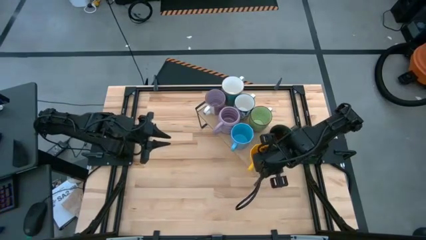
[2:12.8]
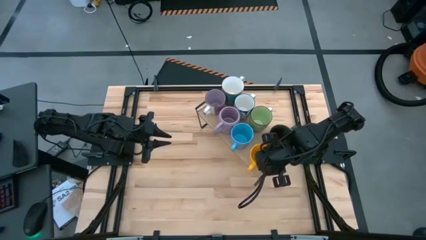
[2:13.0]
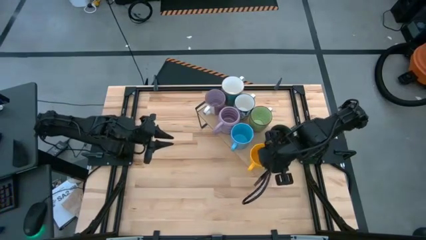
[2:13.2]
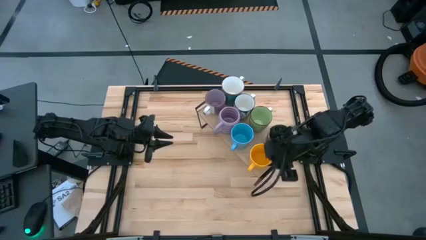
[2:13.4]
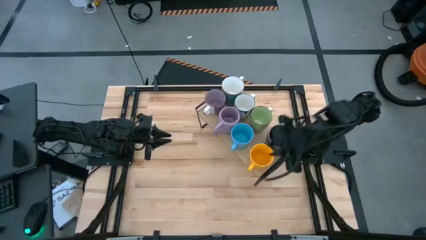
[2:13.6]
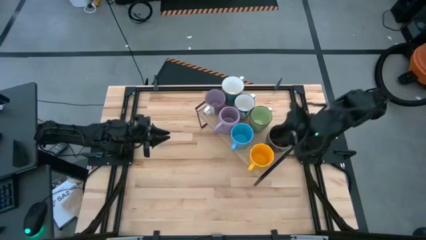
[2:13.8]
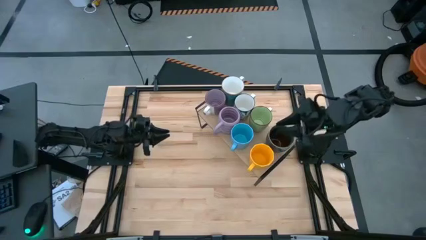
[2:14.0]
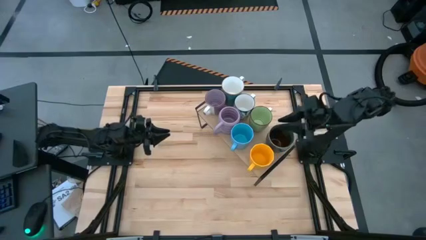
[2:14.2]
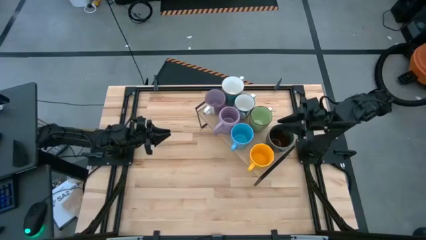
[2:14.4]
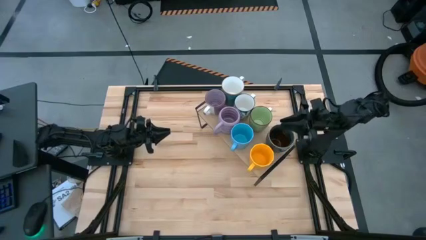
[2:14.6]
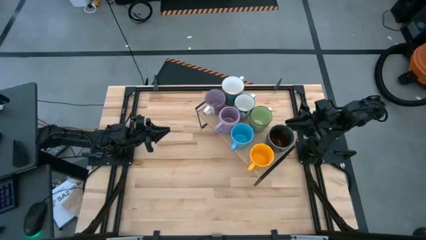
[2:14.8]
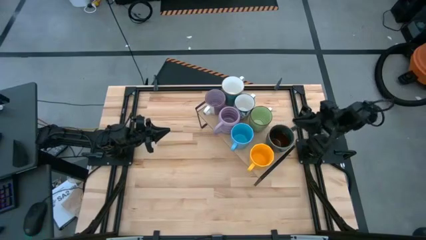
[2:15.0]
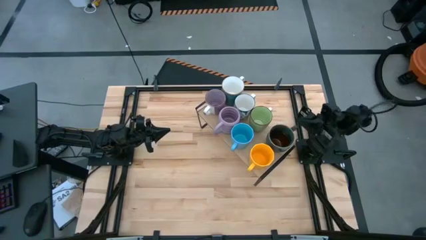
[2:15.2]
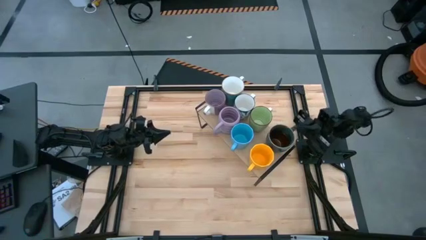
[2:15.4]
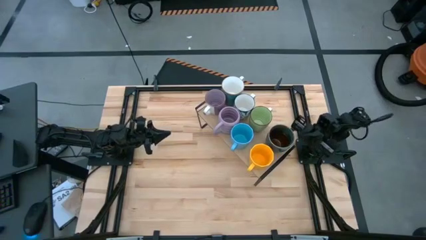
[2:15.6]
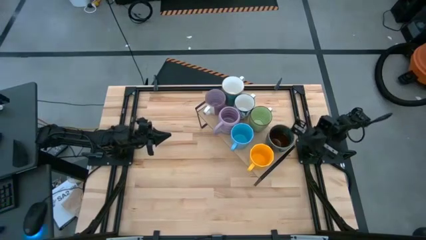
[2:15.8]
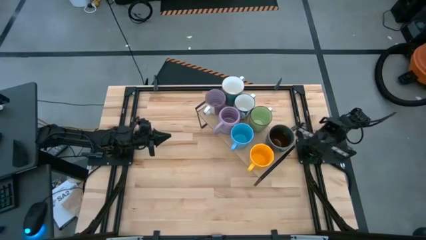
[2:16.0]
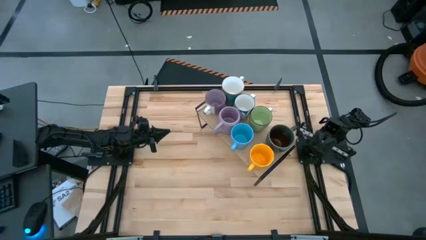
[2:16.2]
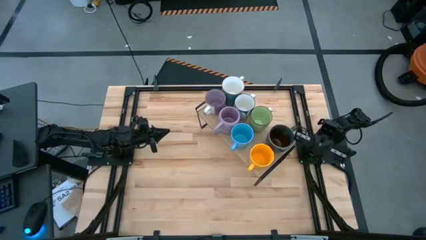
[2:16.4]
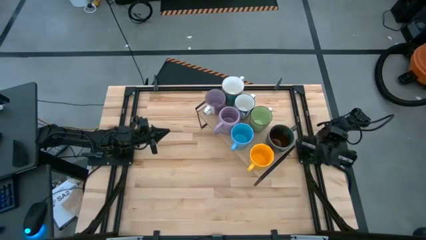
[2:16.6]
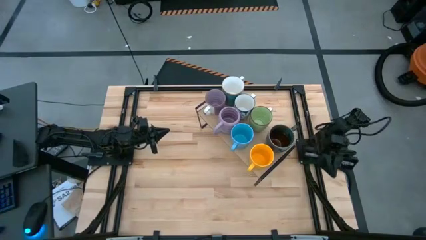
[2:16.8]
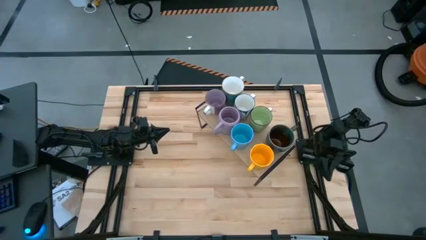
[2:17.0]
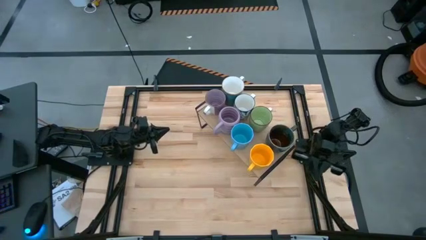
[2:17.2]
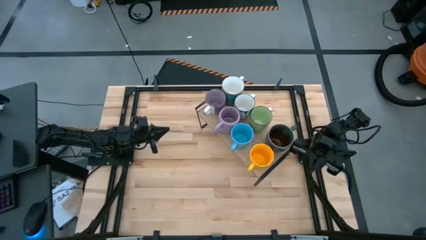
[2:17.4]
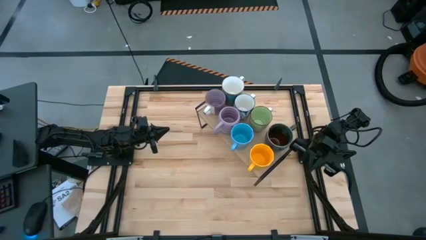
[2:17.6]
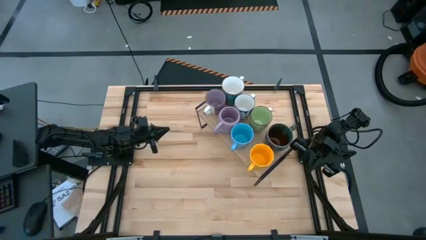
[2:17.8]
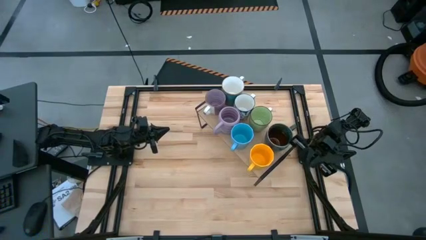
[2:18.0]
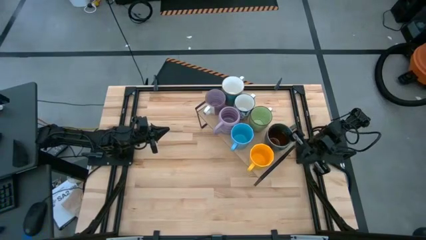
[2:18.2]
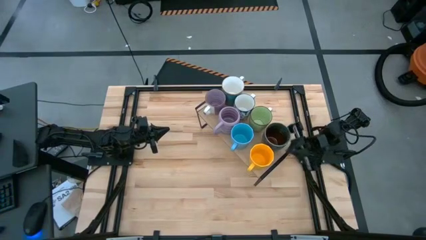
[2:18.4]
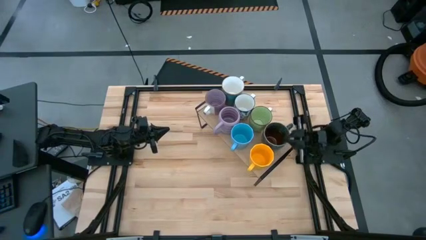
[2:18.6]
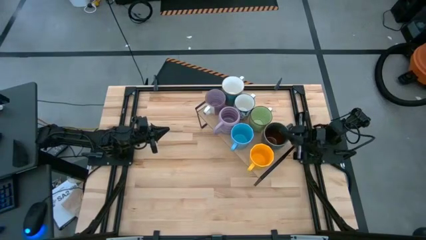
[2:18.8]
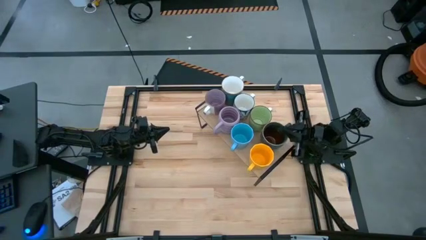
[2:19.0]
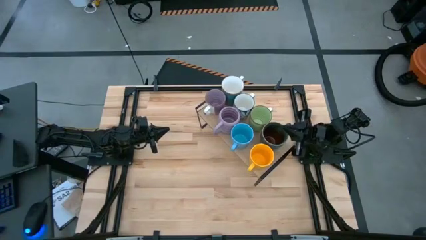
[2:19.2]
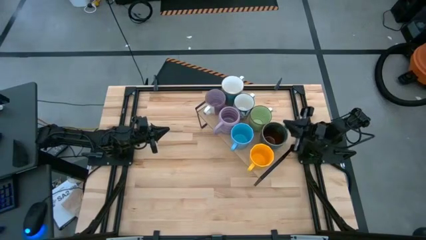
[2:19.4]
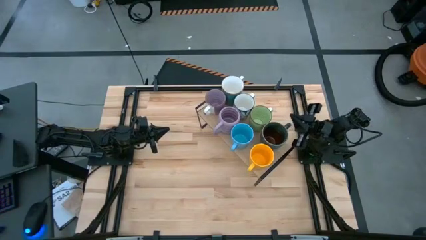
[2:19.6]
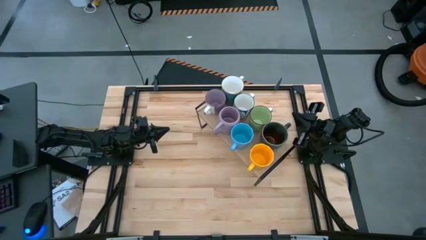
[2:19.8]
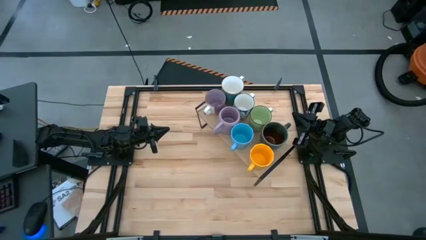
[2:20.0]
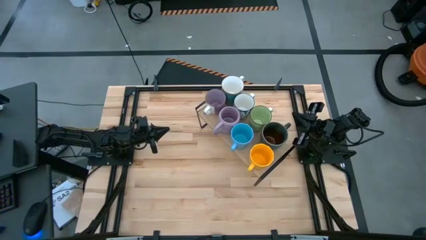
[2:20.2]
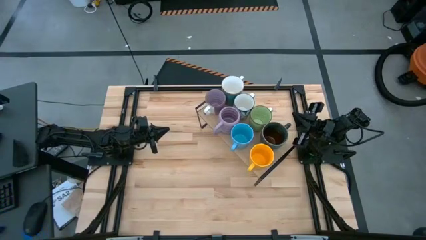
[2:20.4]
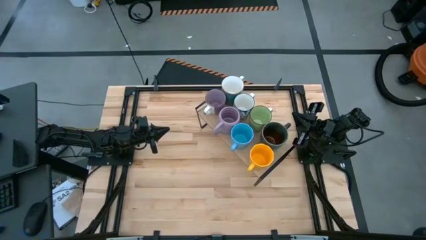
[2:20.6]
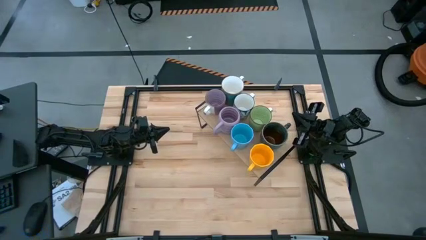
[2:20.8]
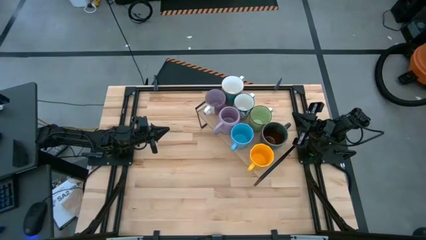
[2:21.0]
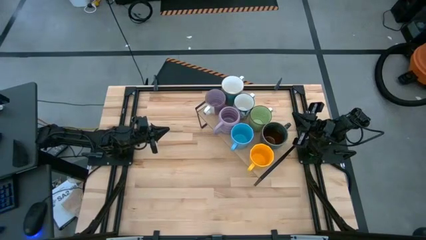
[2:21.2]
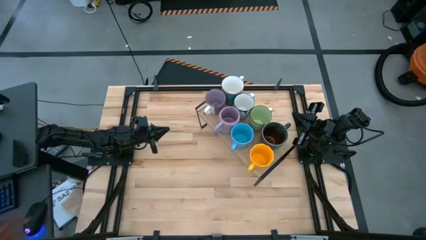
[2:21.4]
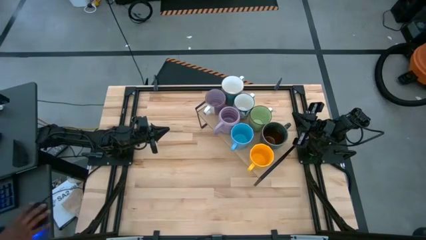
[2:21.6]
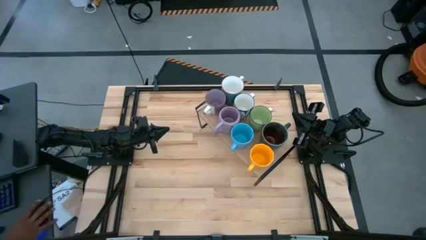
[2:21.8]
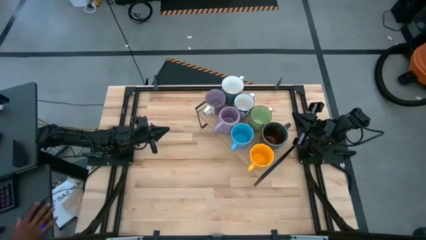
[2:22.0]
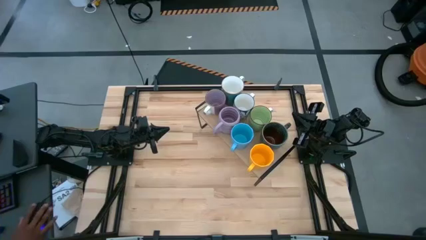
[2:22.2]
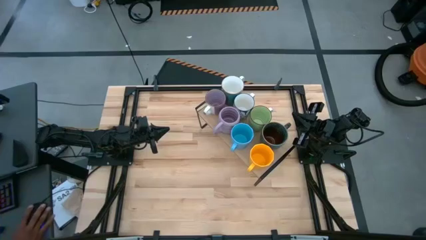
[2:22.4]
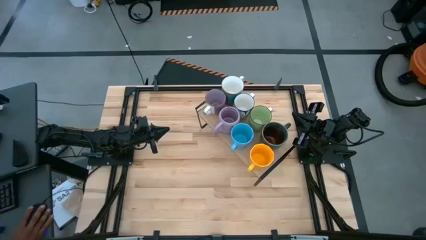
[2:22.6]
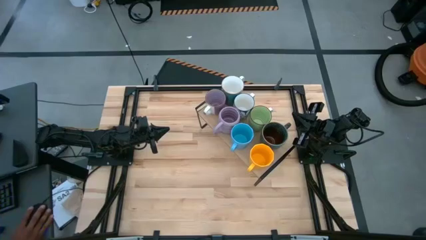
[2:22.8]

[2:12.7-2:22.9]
Task: Place coffee mugs
Return to Home Position

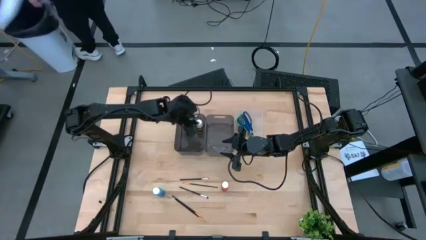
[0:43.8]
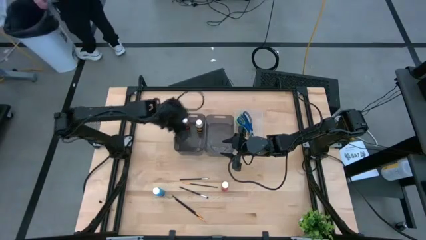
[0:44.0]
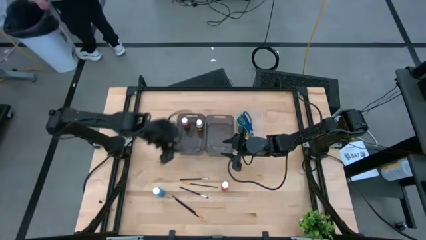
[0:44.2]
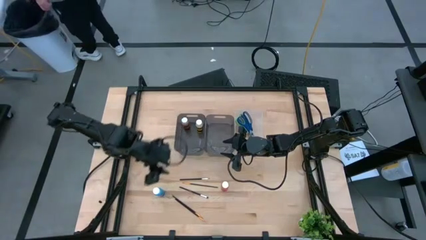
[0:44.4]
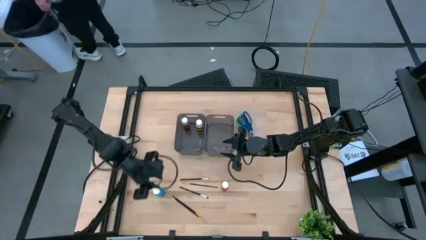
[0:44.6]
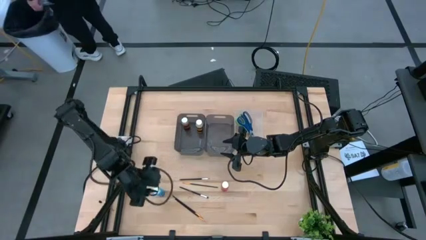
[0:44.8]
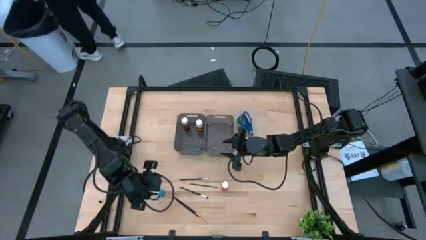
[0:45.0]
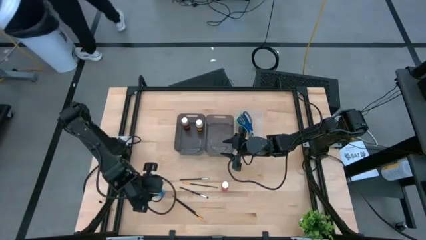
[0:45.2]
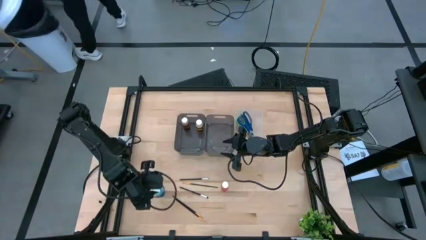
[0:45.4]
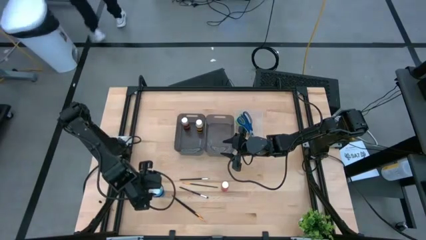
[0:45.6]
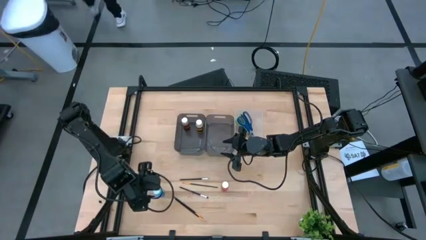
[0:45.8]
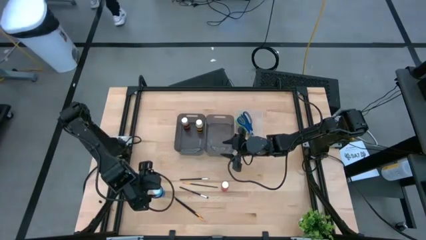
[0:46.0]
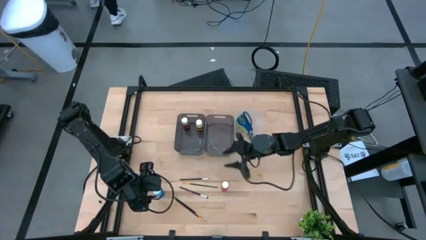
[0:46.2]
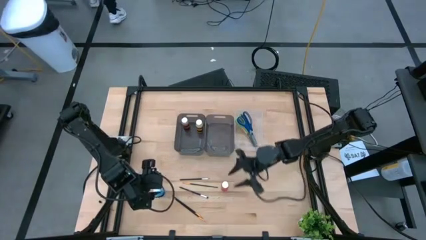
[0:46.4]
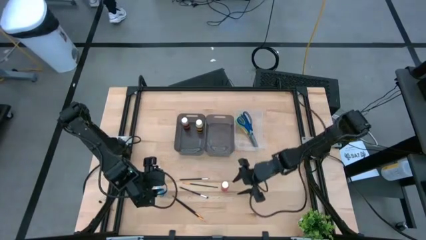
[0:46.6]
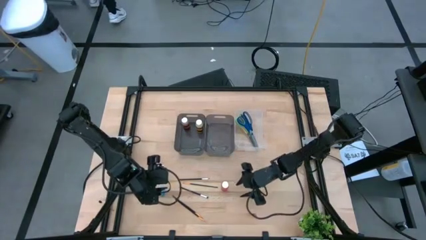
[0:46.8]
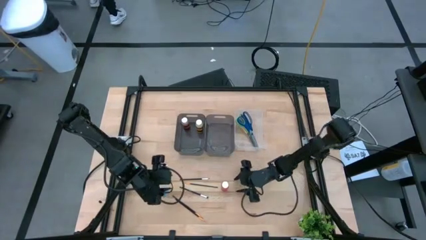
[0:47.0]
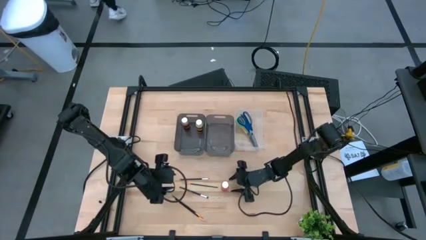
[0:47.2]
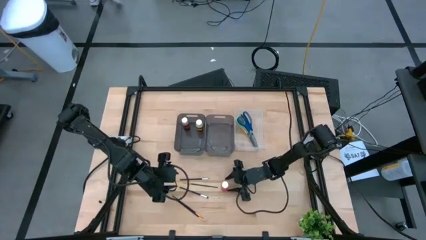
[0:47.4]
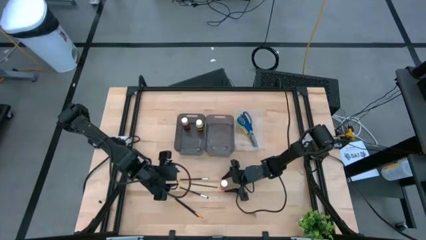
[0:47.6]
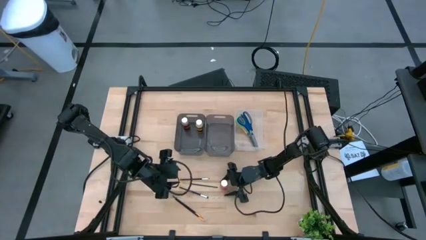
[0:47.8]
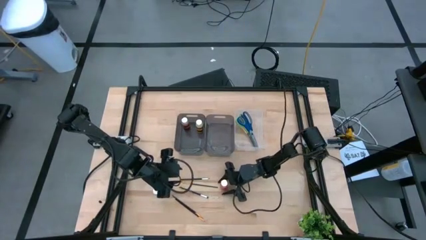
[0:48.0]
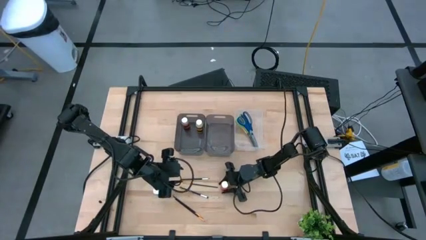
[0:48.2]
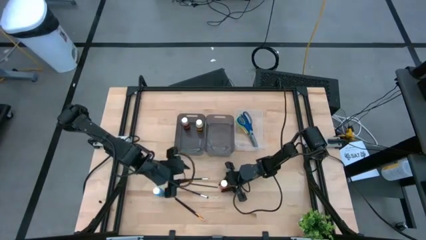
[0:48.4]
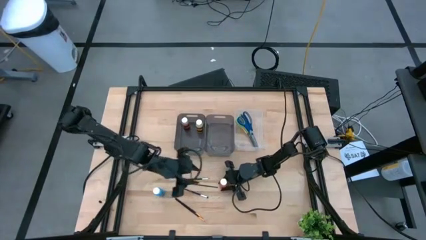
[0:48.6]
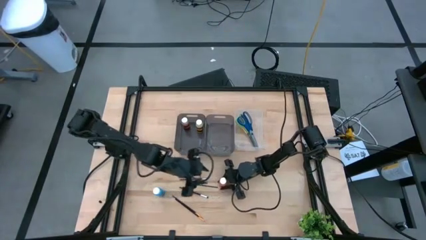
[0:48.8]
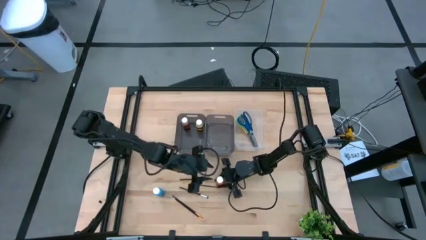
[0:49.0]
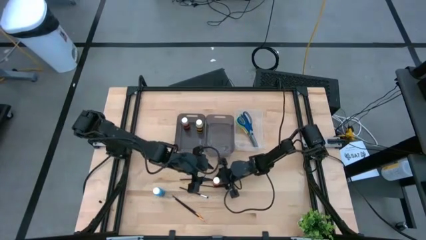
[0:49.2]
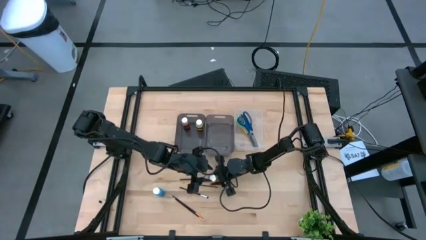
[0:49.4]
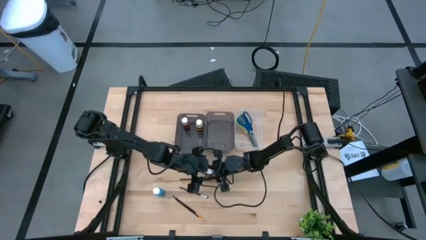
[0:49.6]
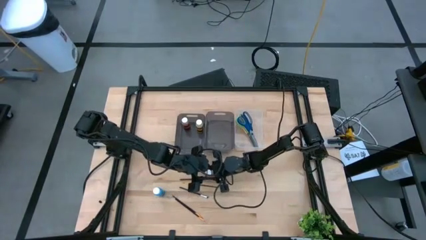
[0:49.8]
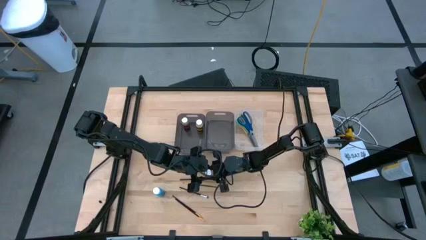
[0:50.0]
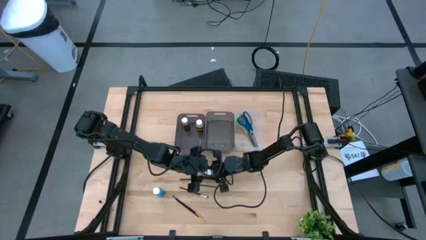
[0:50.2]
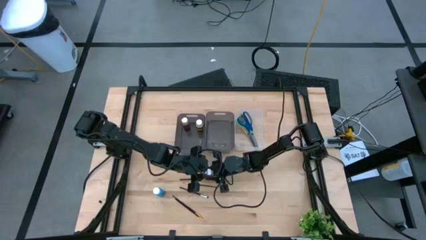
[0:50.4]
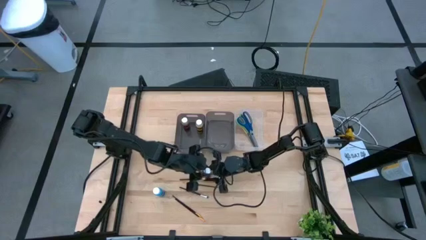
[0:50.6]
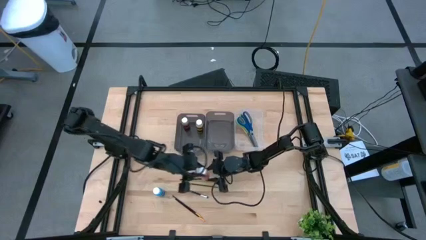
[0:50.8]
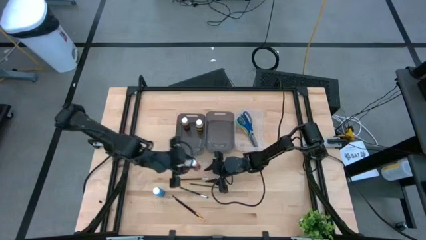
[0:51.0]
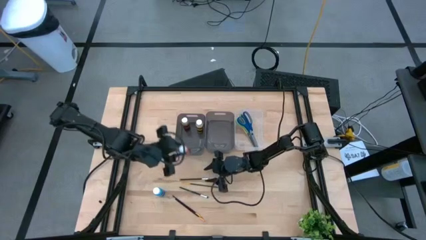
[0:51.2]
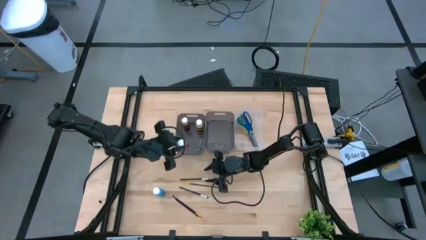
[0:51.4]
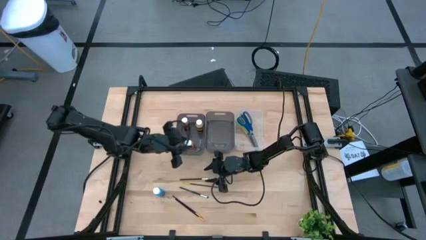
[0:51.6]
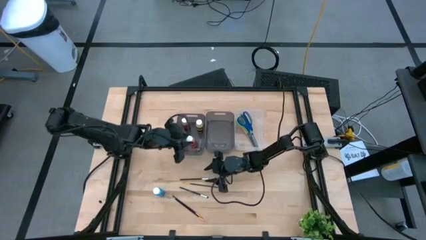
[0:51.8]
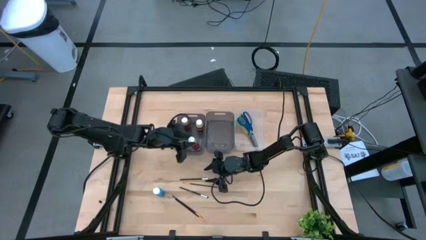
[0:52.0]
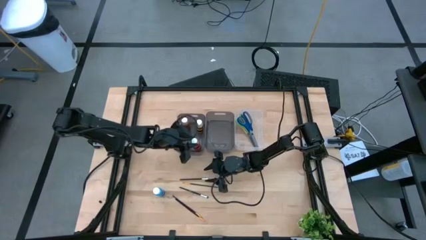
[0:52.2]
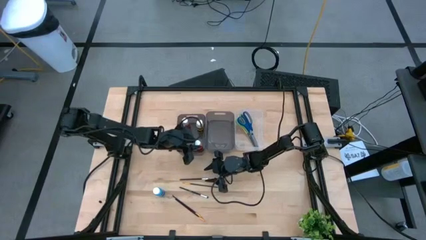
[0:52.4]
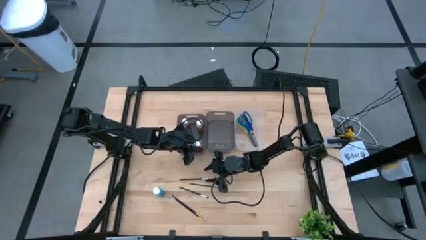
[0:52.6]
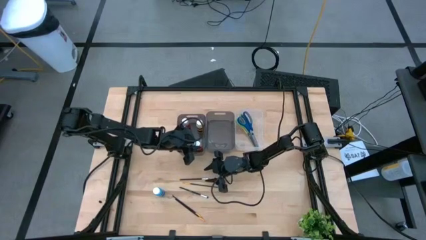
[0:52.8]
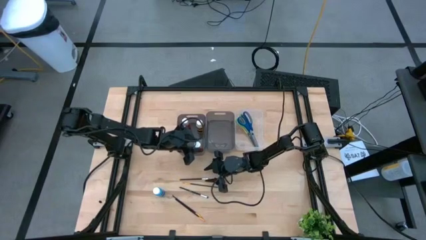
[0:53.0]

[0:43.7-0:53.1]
Task: Pick & Place Paint Supplies
Put the orange paint bottle into the left black bin
